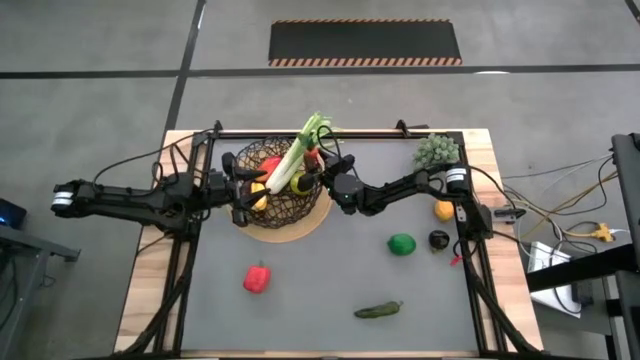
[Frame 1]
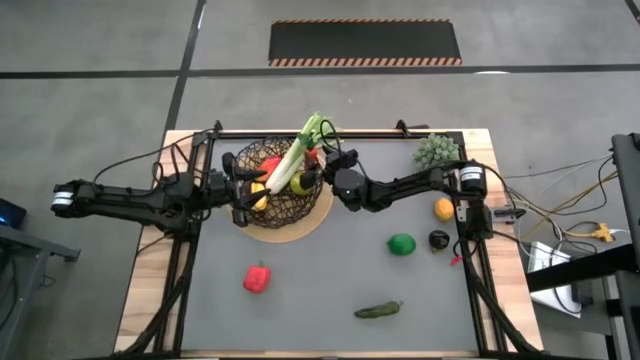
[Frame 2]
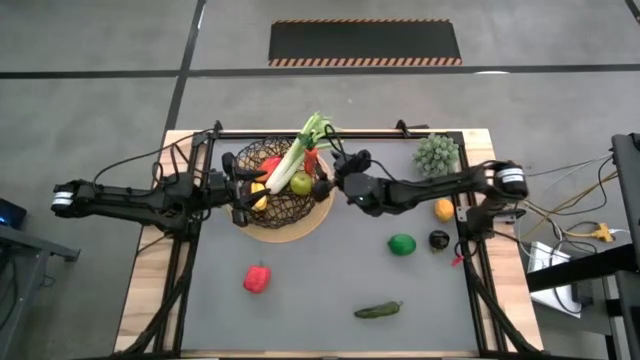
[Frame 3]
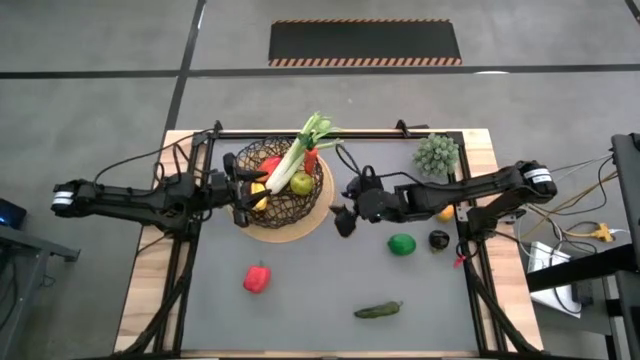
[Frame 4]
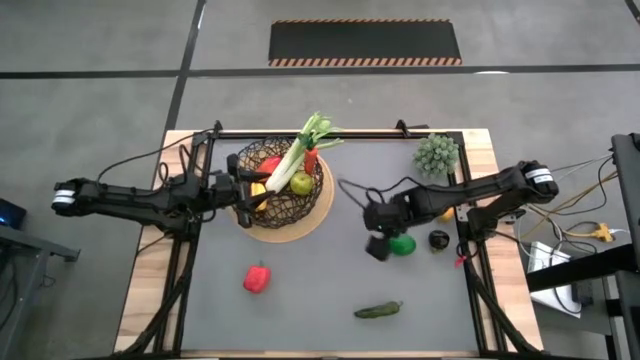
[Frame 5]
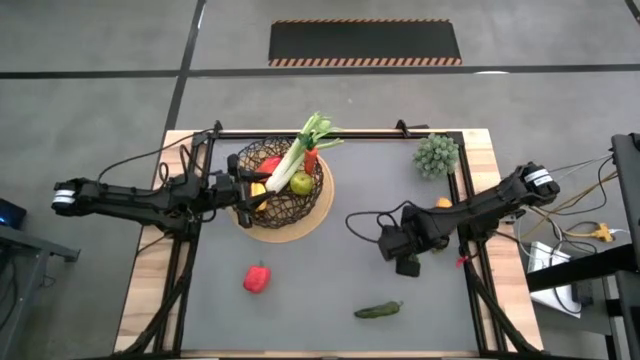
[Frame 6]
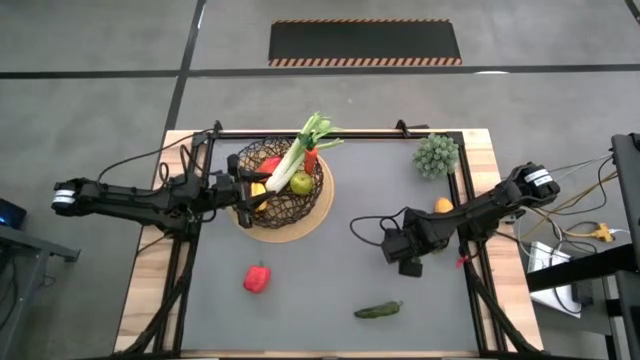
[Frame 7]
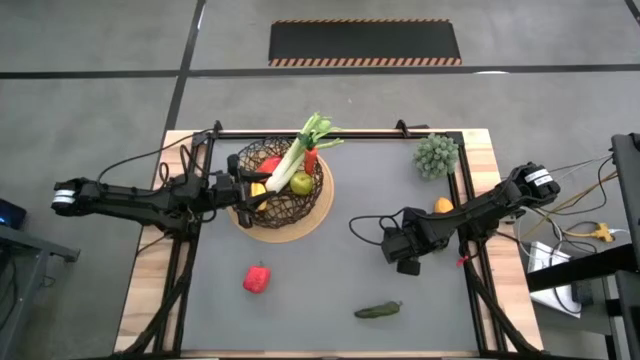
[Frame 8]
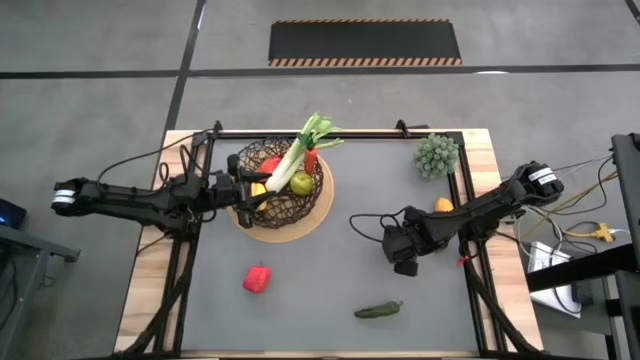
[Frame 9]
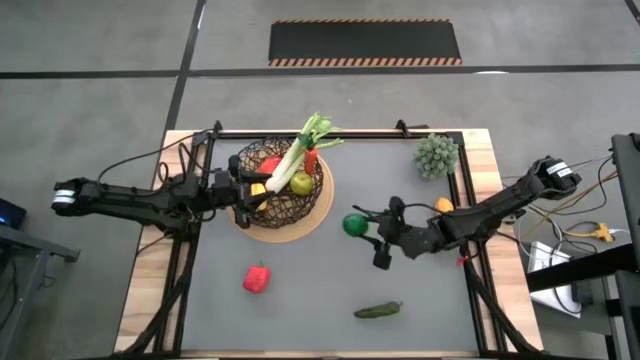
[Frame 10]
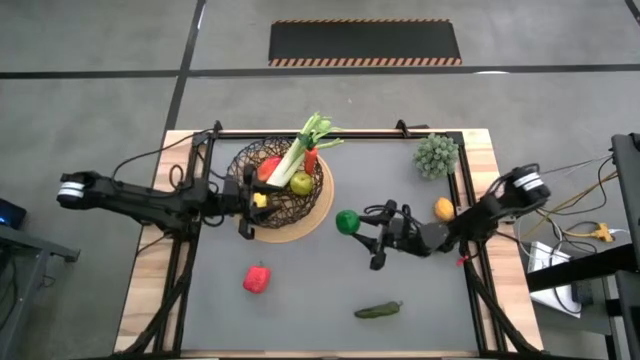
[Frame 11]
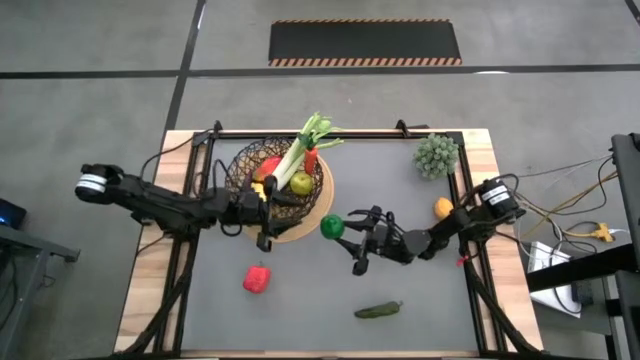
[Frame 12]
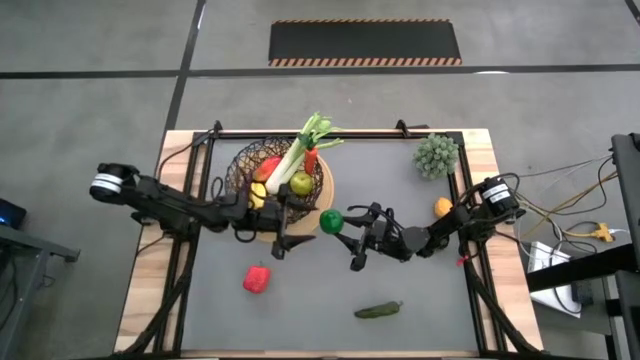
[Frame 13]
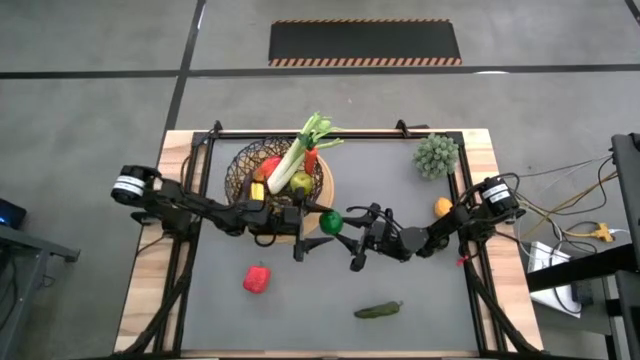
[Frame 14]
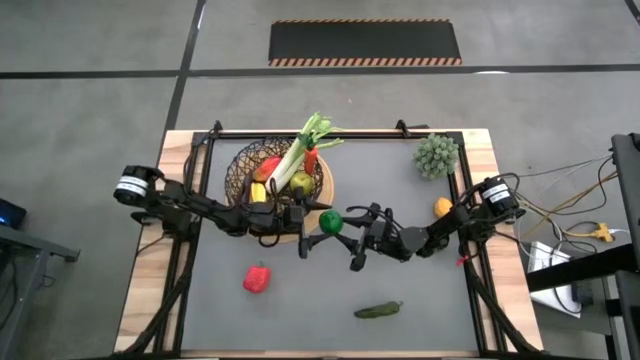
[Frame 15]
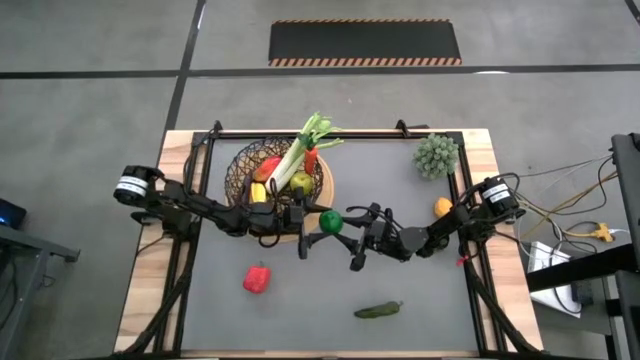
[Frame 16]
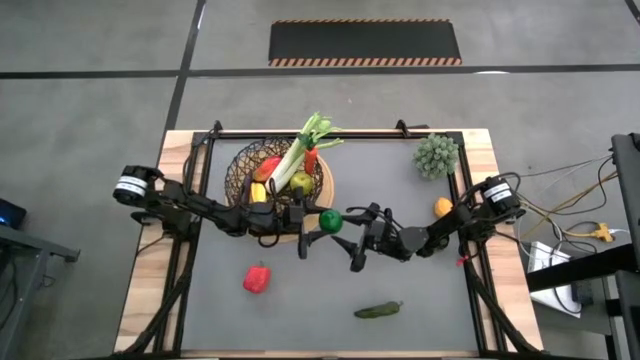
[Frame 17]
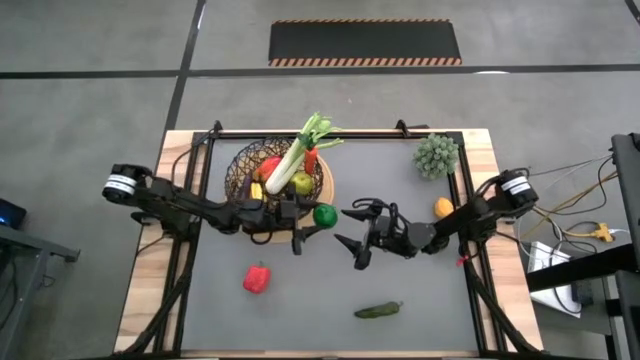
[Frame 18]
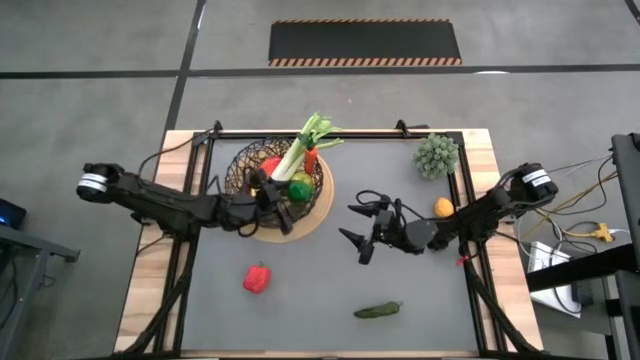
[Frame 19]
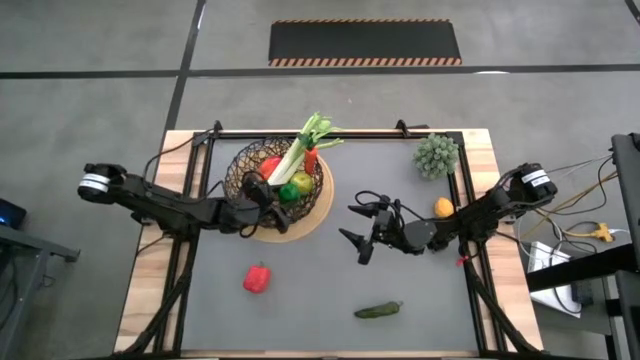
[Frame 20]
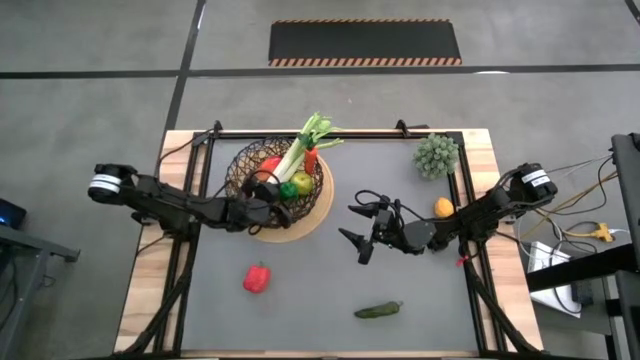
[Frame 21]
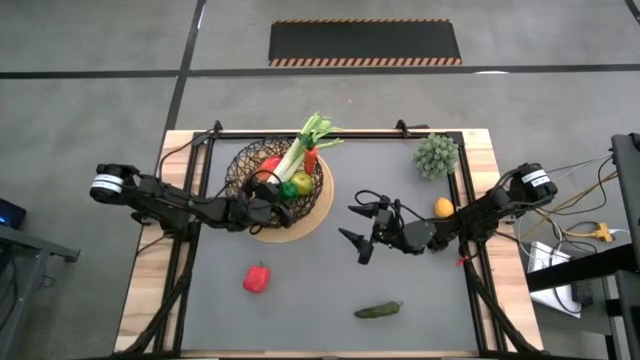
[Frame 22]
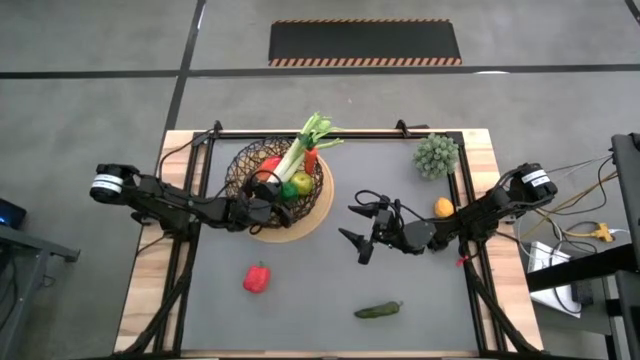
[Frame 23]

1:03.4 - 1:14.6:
Task: Build produce basket
Put the green lime into the black wire basket

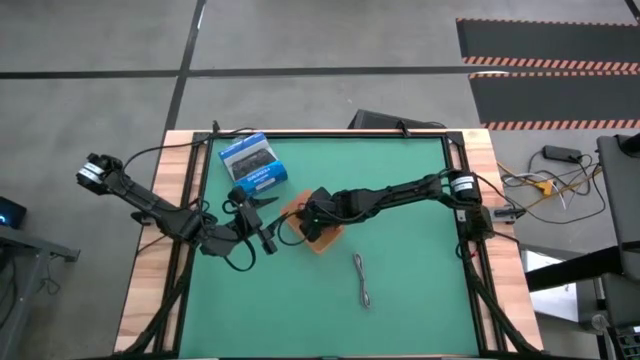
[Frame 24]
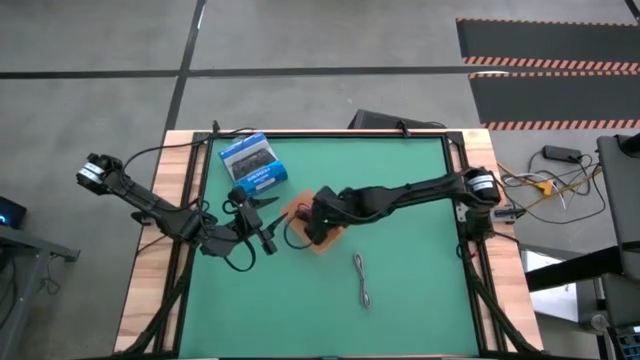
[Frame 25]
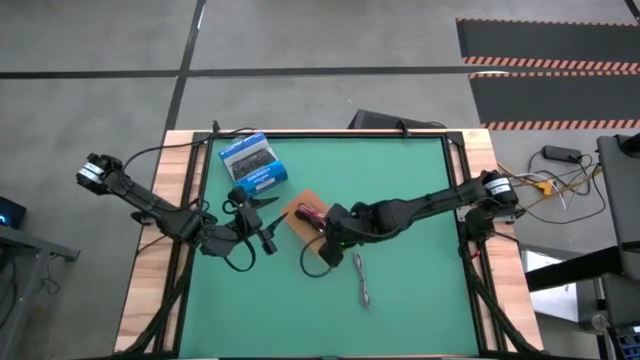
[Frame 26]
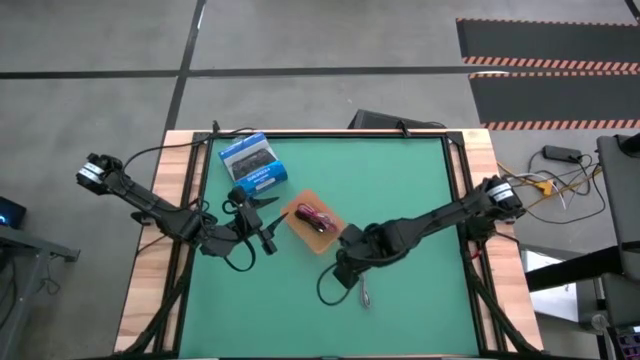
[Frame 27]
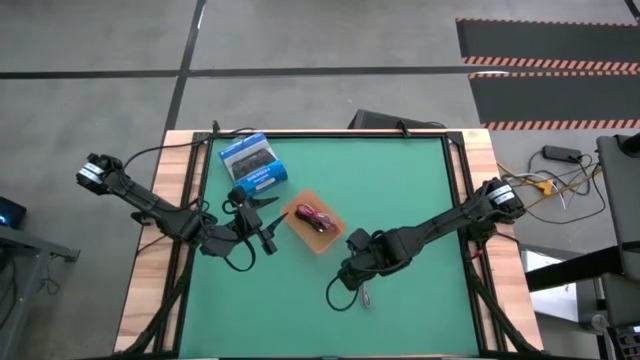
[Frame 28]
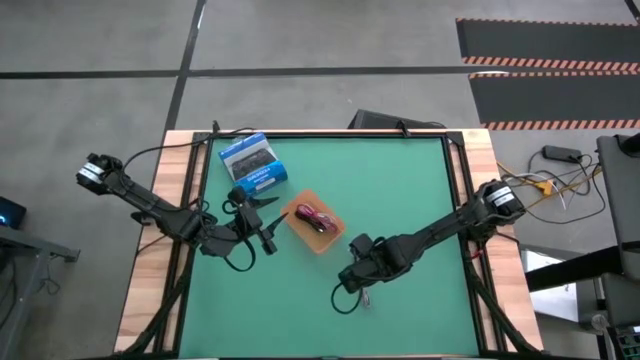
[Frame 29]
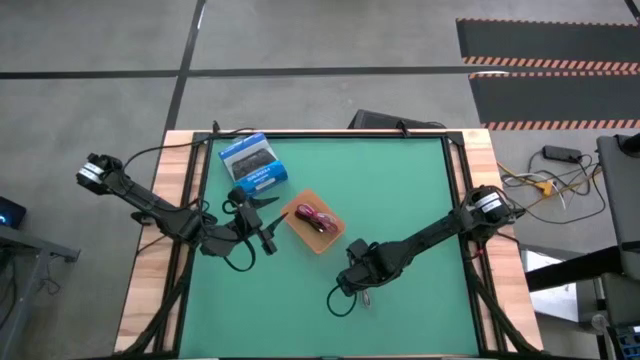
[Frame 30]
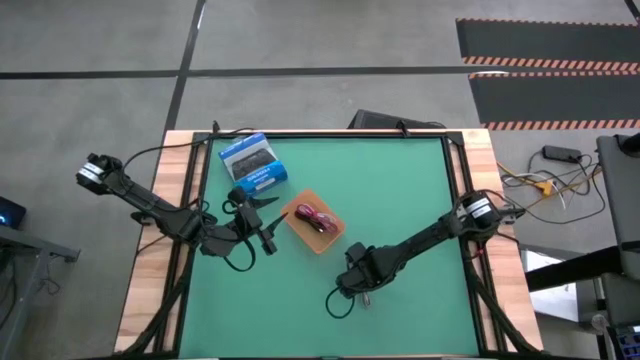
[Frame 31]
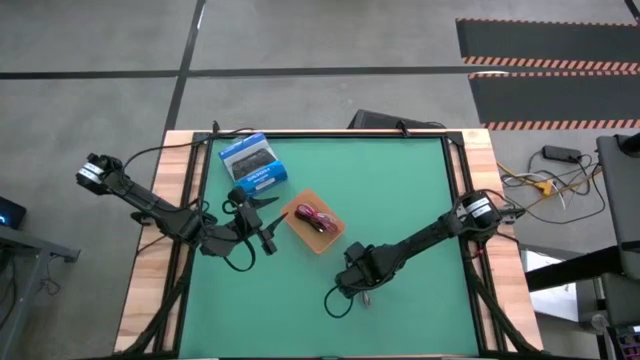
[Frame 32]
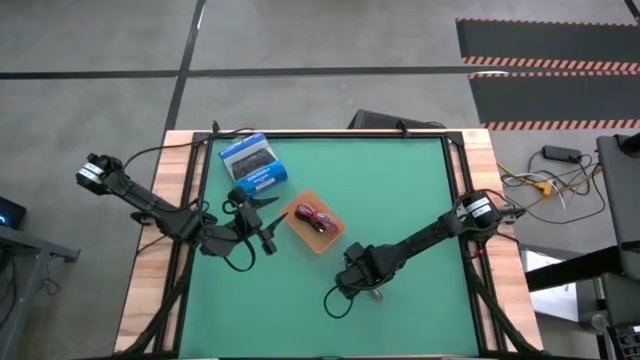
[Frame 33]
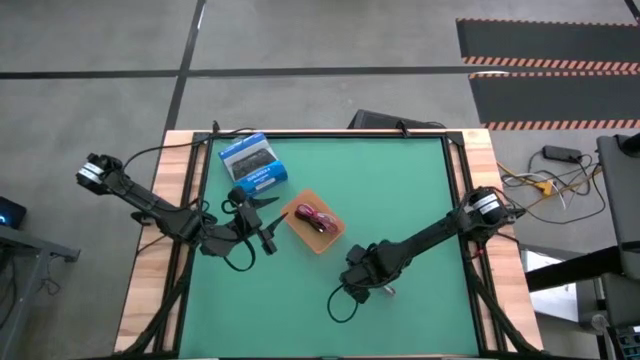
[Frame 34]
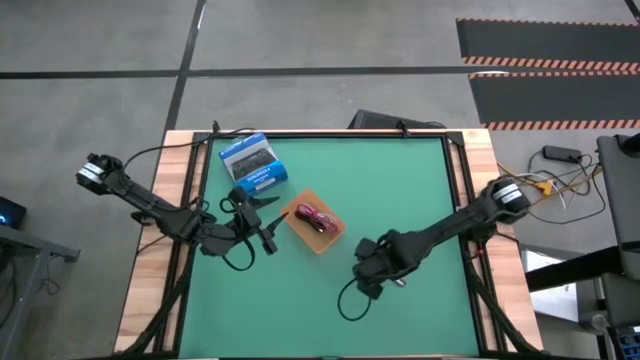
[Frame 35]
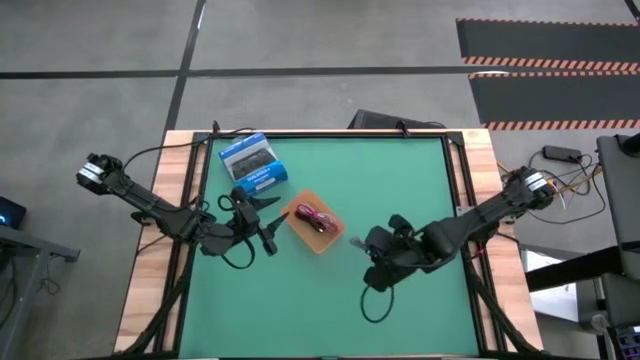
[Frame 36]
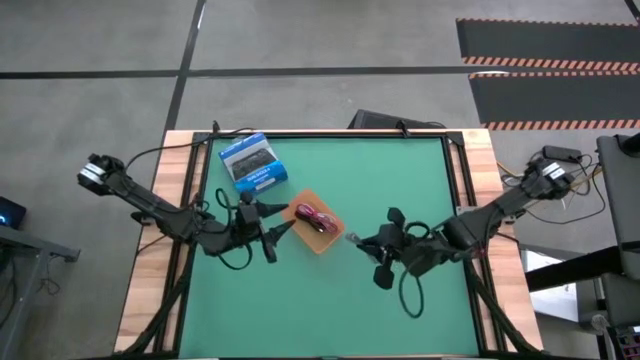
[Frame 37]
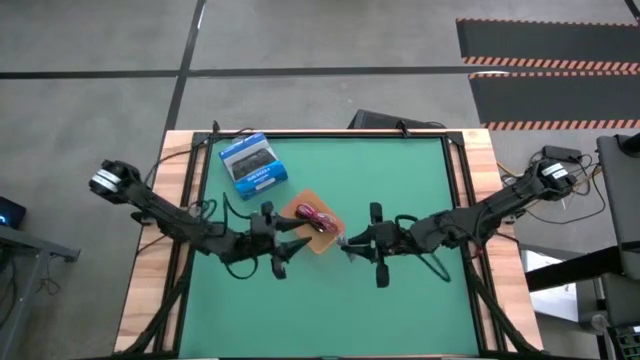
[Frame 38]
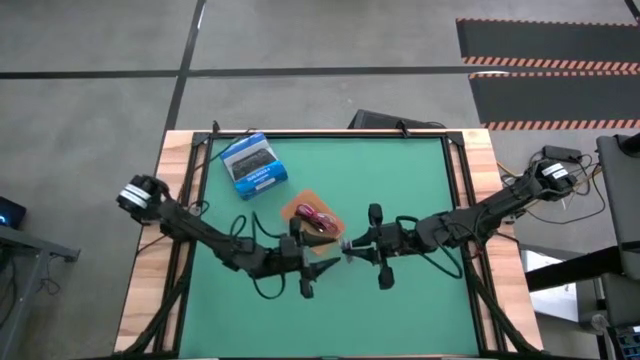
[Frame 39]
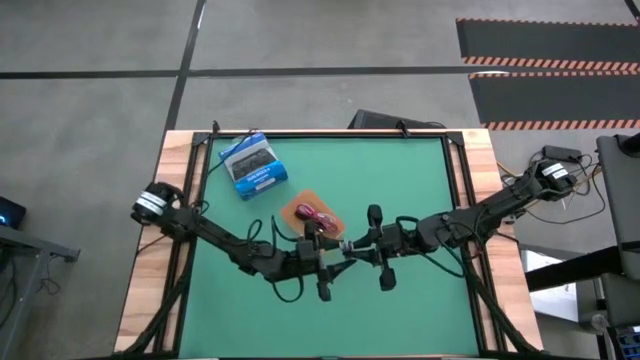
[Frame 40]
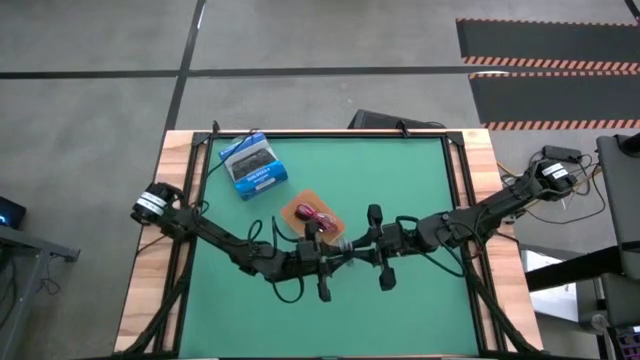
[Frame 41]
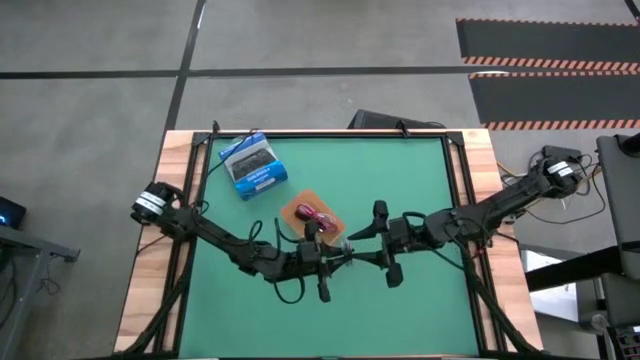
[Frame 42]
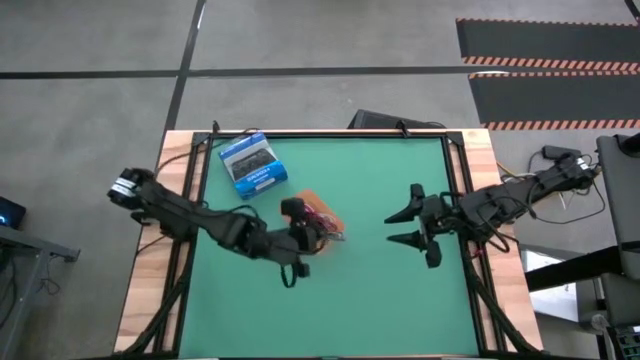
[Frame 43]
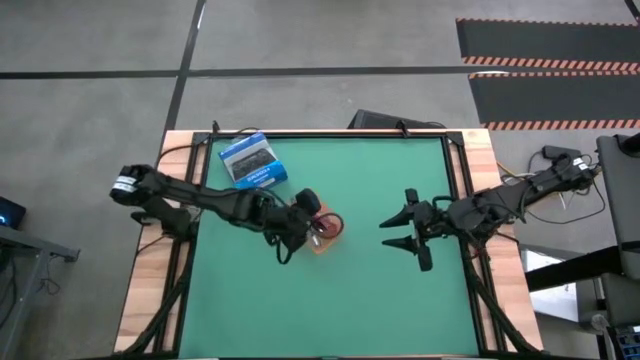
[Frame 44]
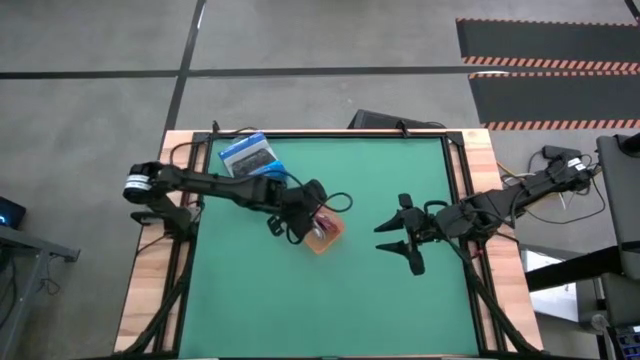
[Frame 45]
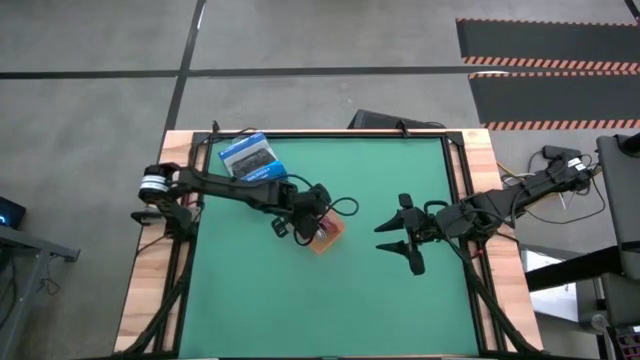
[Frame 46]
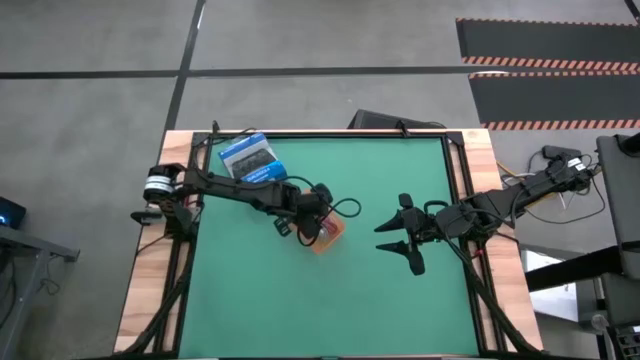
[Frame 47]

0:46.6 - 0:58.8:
Task: Pick and place USB-C Cables
Put the white pattern charger cable into the orange bin
